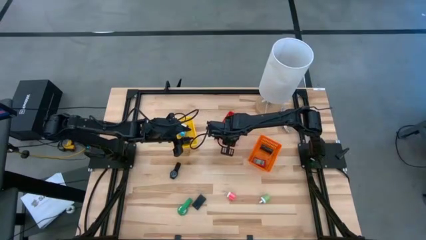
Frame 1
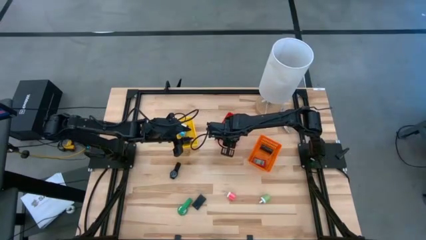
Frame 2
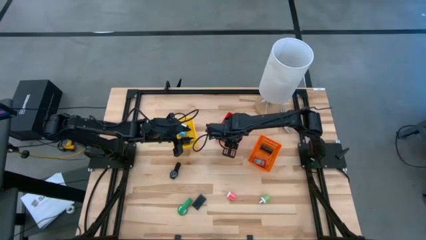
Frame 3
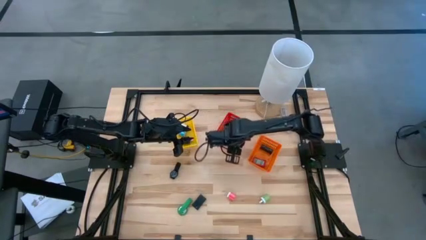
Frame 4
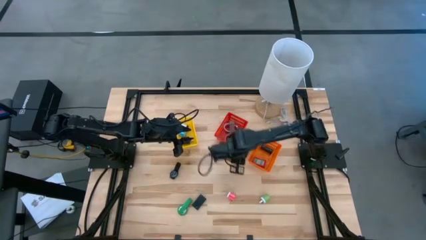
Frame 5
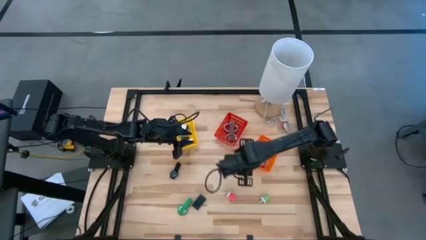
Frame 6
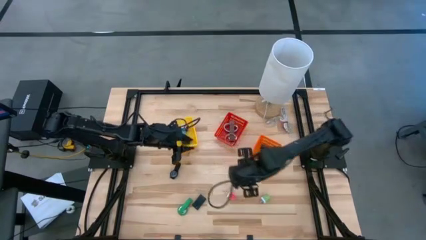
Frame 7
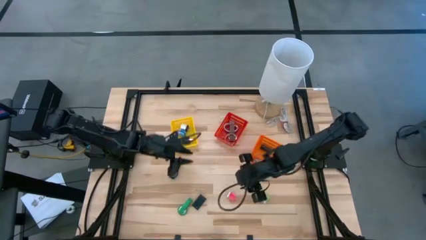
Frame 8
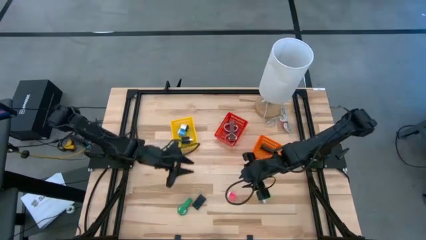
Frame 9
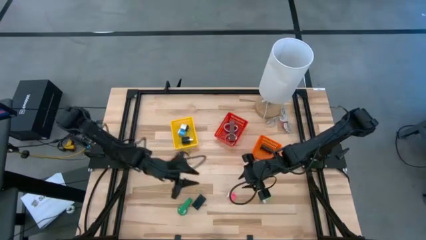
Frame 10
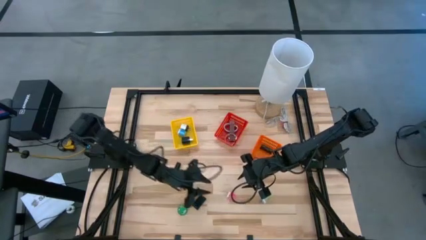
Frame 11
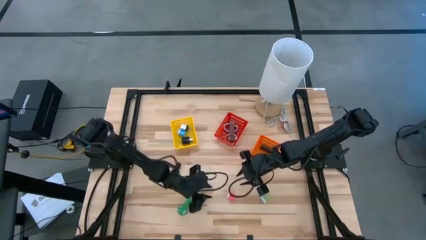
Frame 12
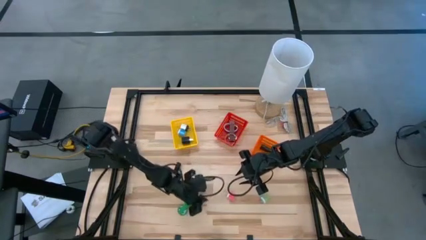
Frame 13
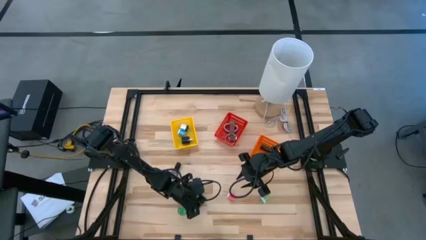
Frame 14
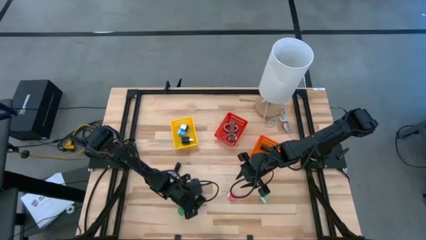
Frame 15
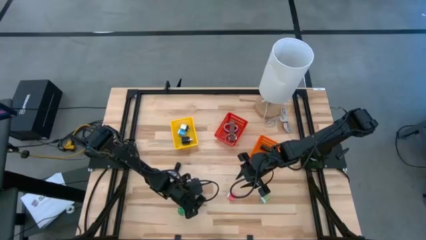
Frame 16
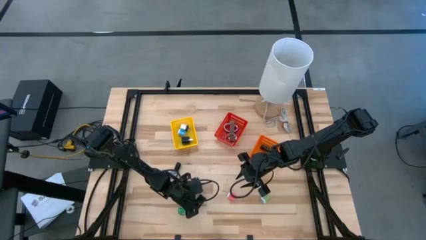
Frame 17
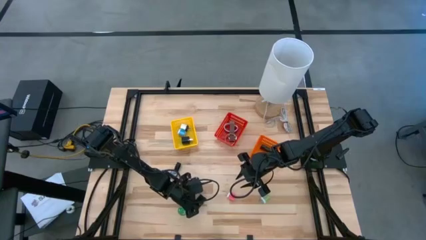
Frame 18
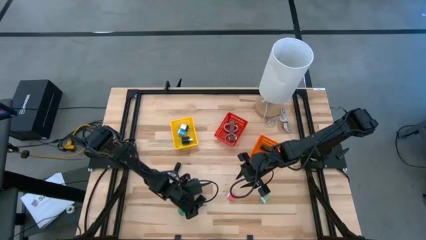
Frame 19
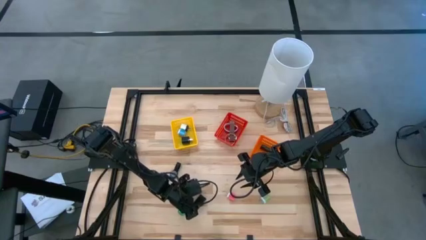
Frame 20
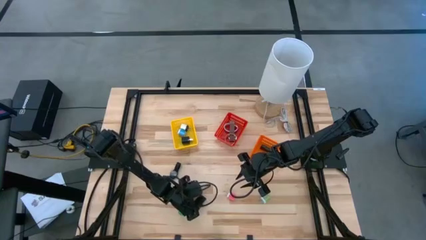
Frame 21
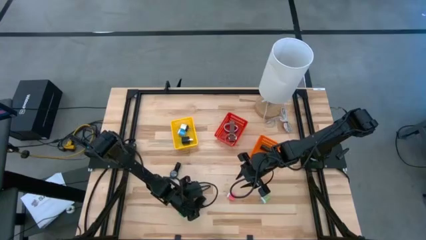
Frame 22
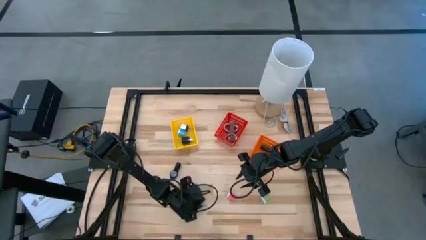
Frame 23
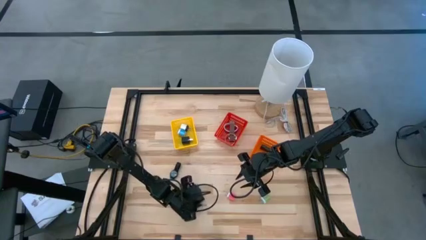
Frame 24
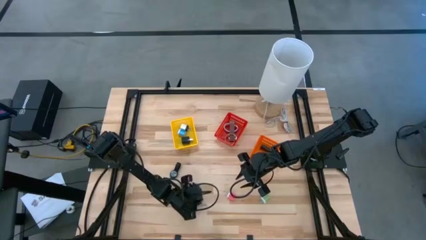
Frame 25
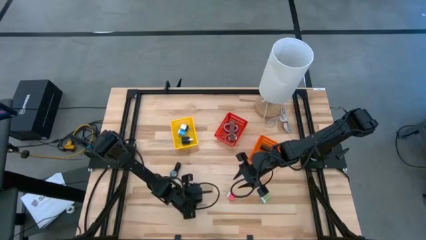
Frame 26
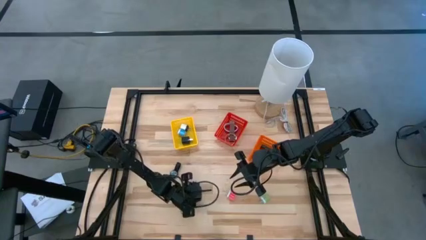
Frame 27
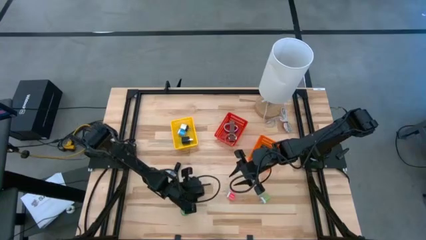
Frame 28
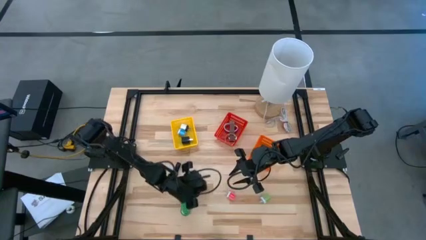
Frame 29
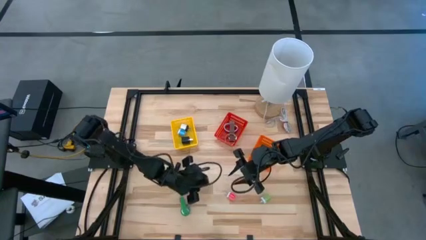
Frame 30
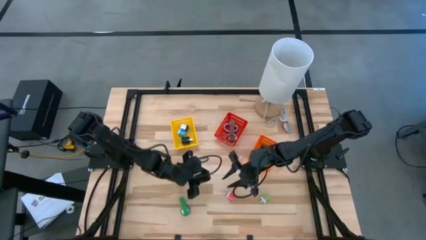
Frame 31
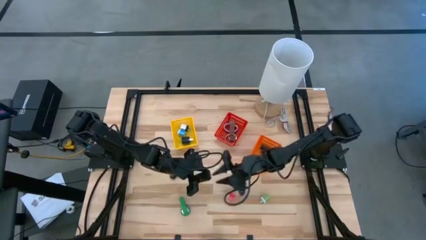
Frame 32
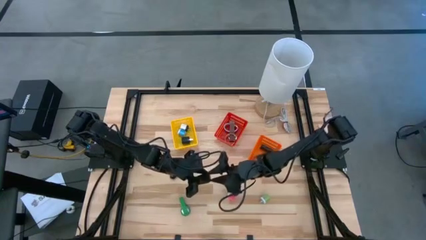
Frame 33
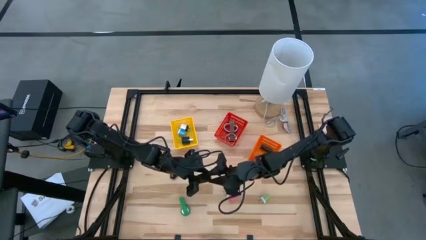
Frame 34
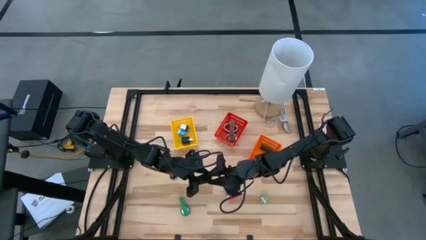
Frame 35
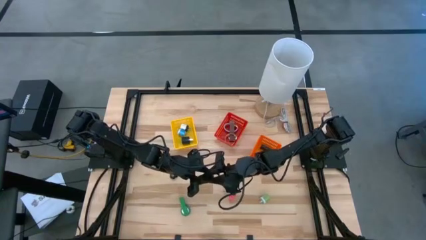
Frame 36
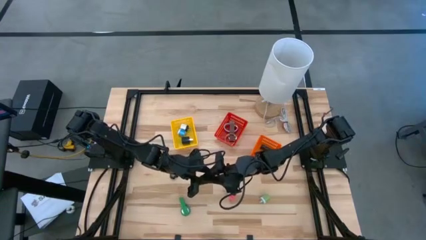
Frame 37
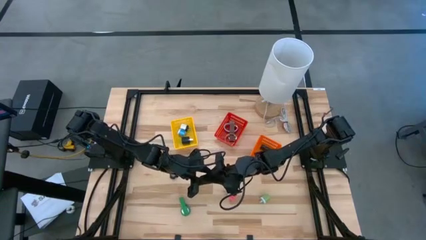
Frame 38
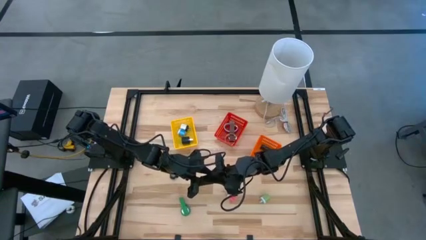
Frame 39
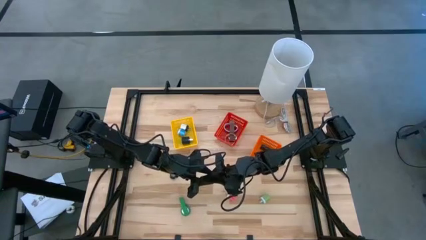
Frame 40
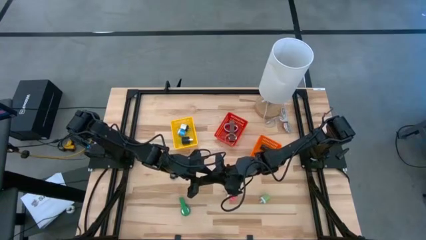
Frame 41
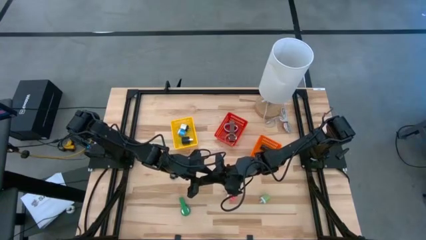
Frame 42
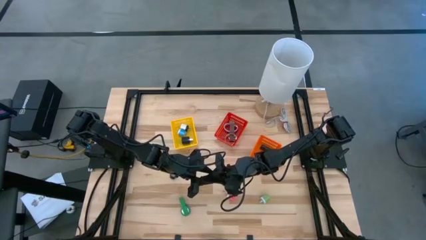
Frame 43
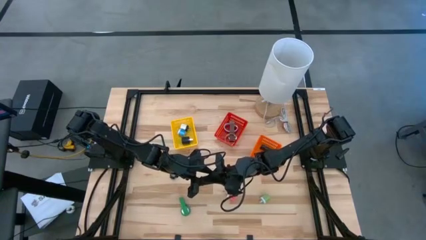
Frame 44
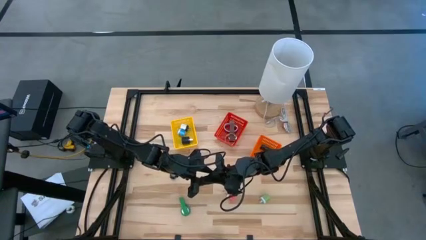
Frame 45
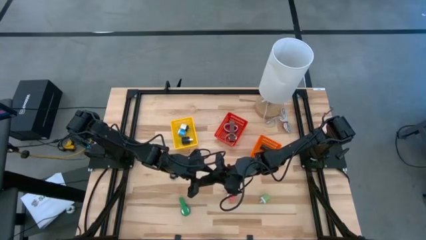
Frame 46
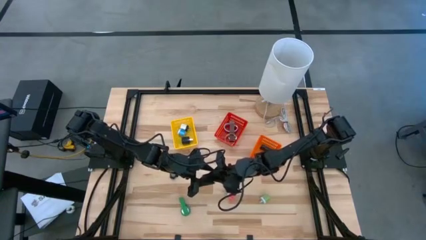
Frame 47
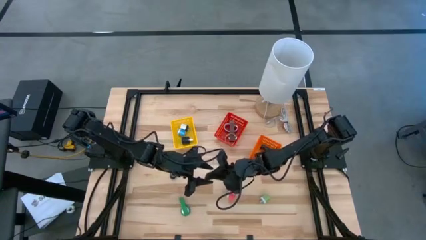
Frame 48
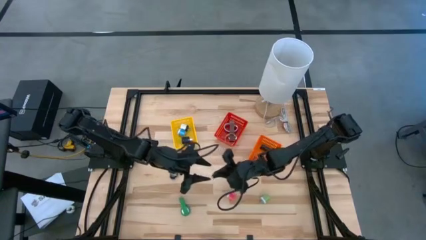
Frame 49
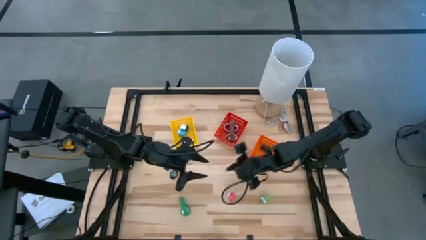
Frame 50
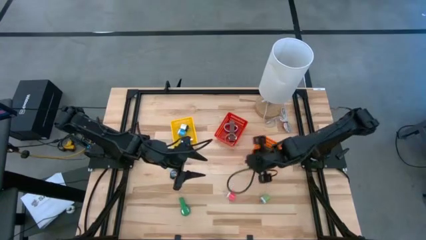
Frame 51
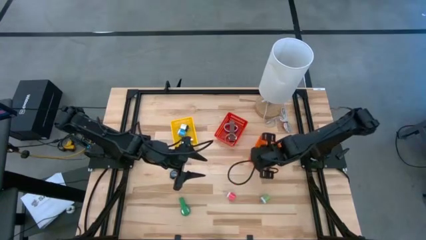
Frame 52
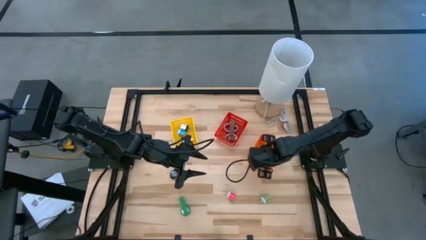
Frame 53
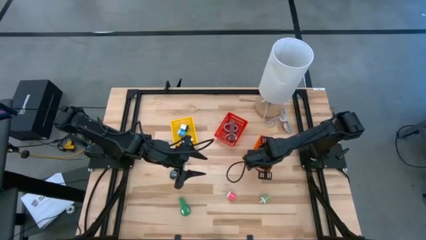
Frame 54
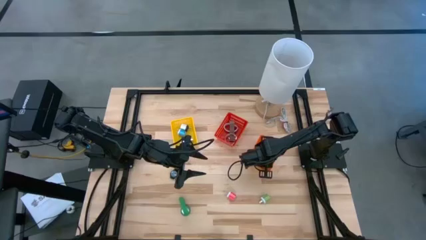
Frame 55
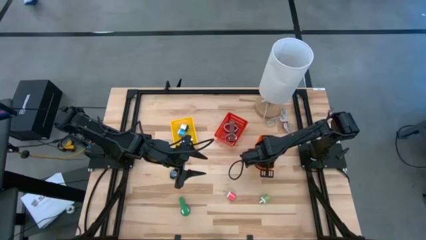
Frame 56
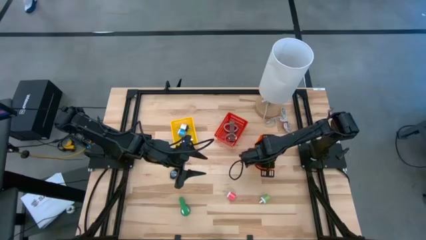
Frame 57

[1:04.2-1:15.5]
Task: Pick & Place Office items
Put the black digital clock into the orange basket

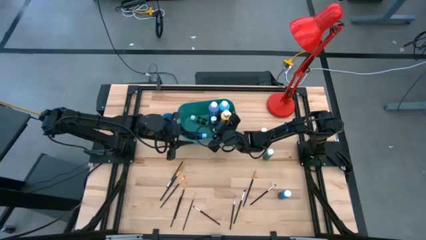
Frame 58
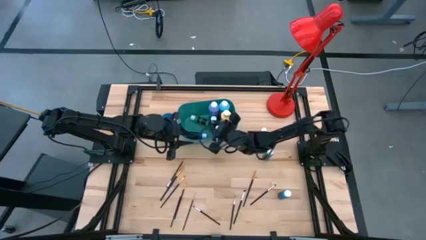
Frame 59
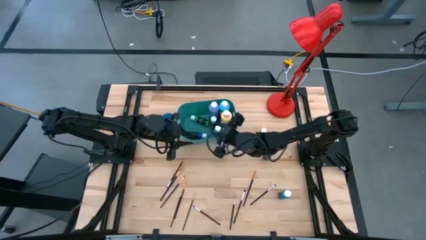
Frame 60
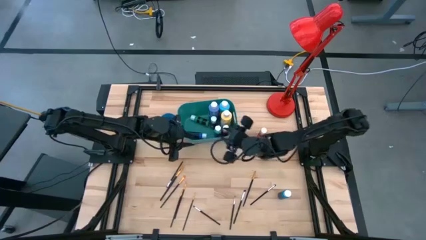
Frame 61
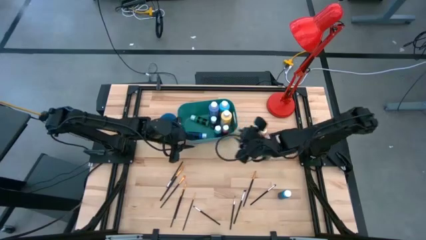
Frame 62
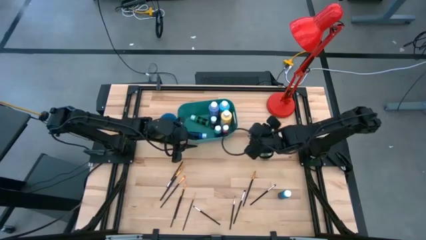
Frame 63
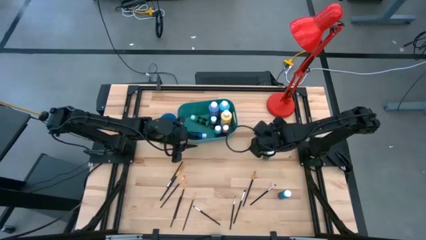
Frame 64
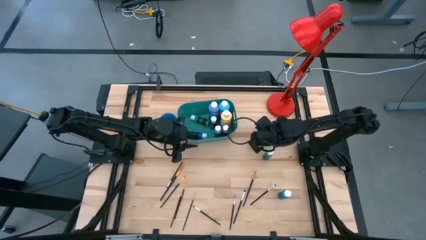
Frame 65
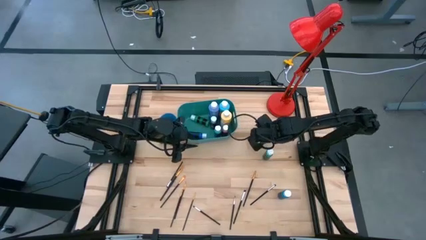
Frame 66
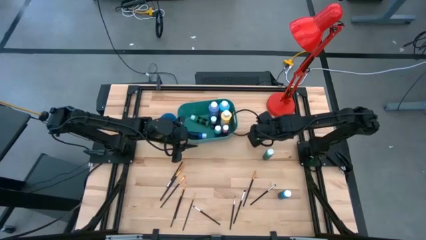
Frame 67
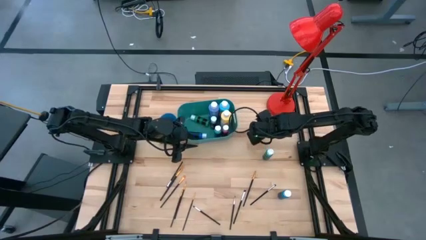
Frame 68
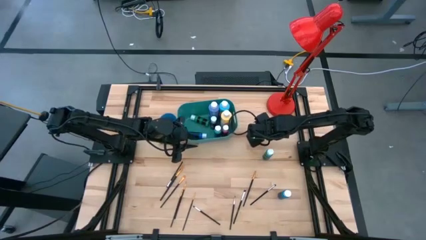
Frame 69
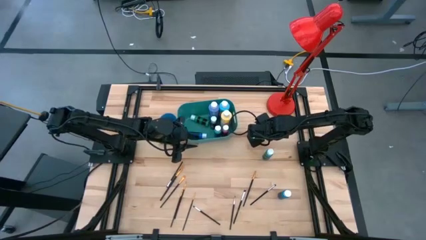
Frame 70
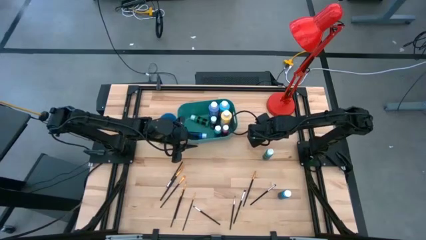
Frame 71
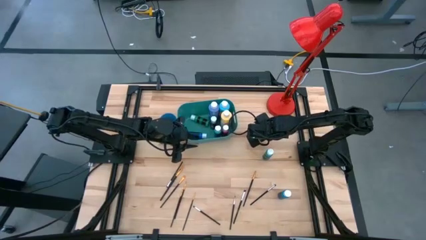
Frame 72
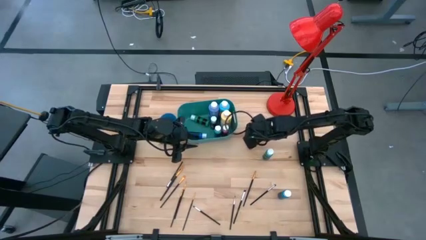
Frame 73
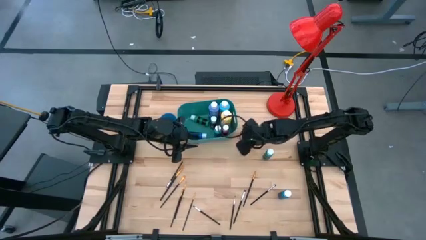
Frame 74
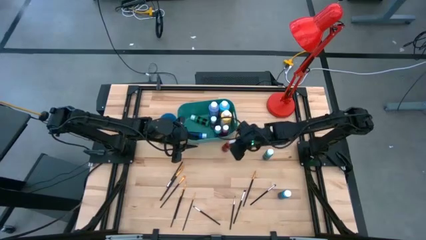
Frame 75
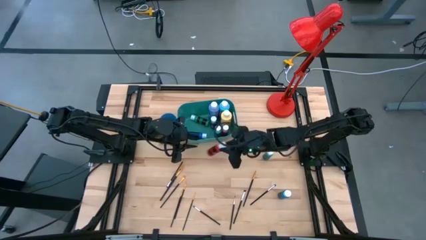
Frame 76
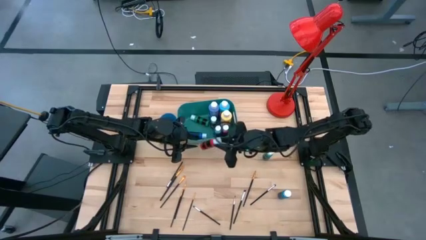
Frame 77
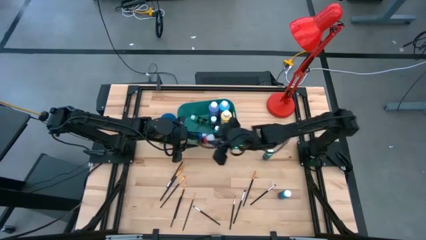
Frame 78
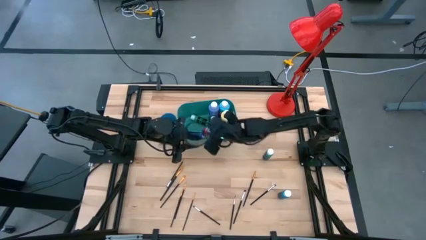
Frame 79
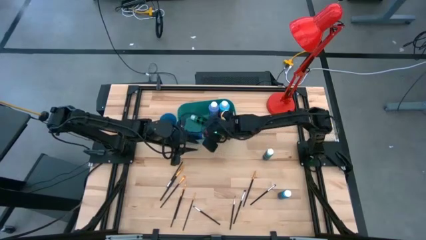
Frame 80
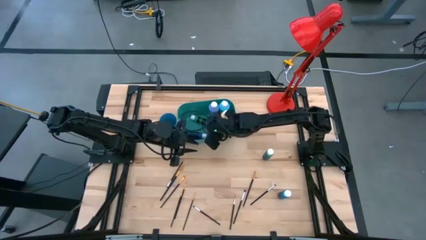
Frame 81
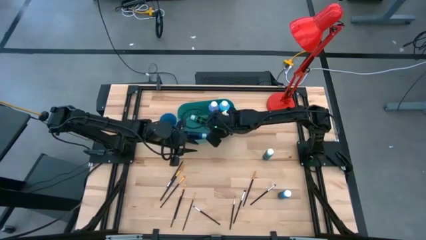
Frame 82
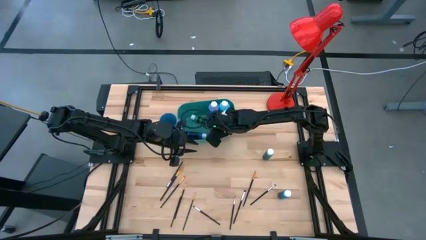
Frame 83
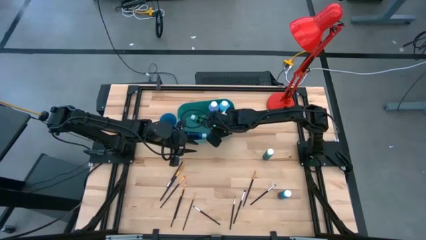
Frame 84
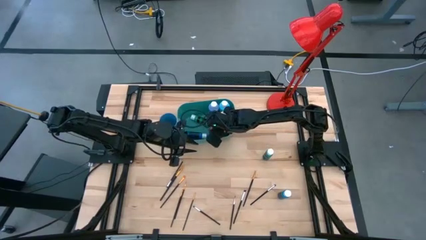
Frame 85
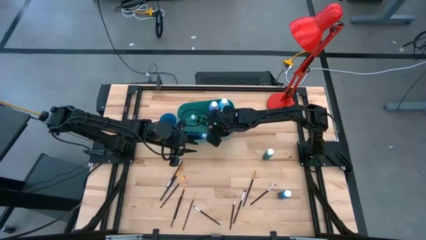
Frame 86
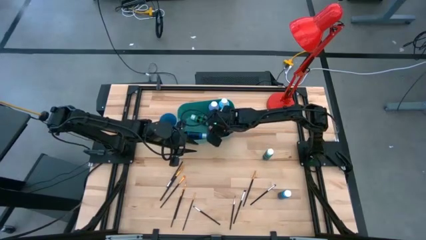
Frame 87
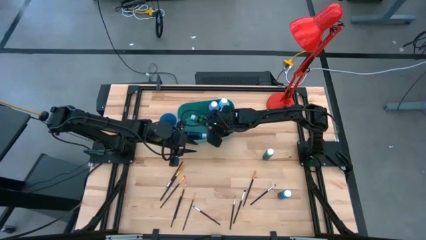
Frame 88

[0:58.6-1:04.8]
Task: Pick & Place Paint Supplies
Put the small red paint bottle into the green bin
